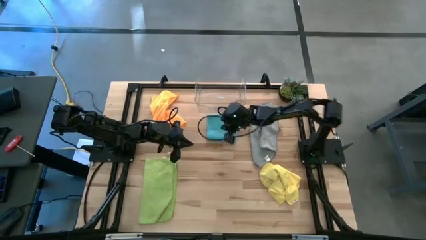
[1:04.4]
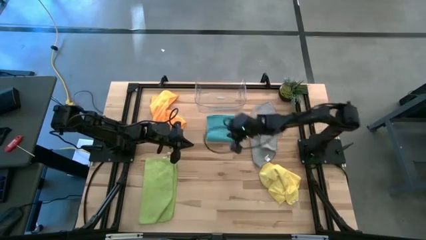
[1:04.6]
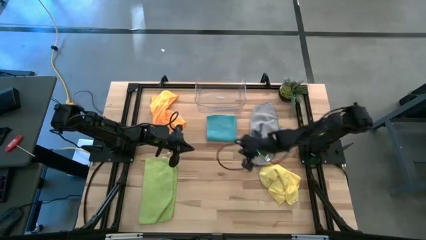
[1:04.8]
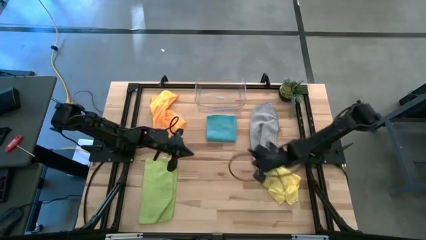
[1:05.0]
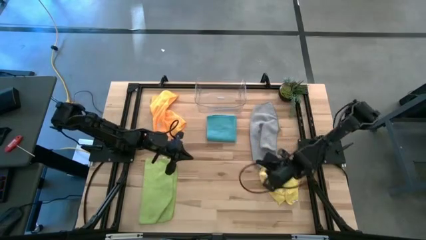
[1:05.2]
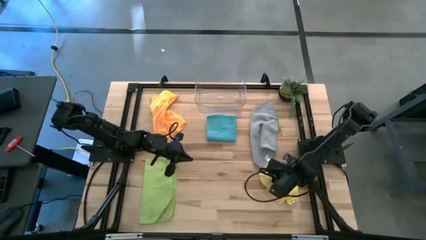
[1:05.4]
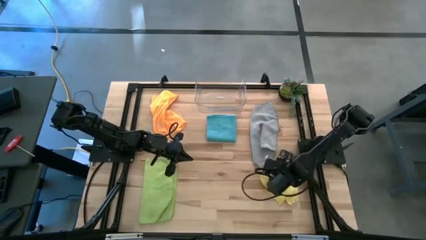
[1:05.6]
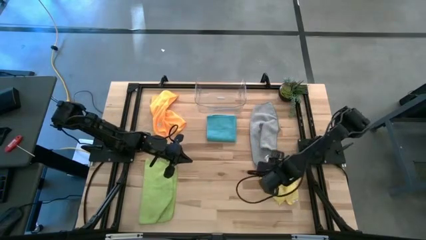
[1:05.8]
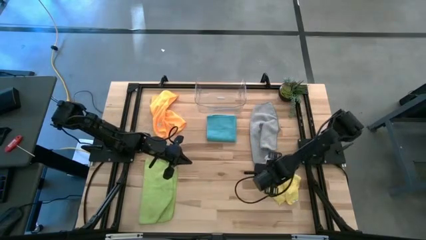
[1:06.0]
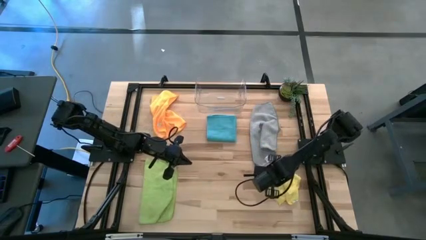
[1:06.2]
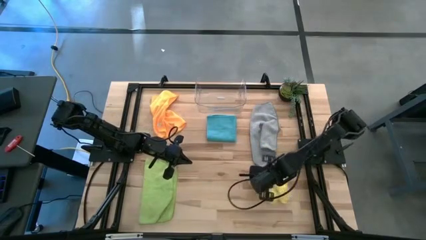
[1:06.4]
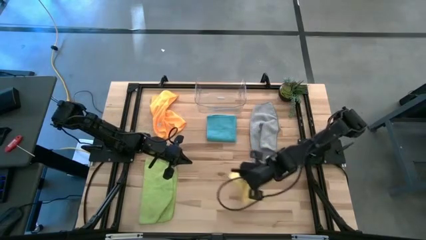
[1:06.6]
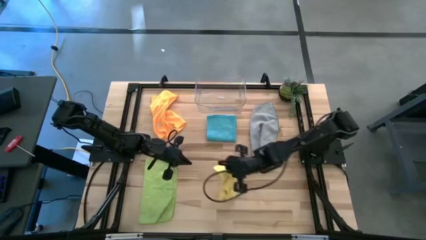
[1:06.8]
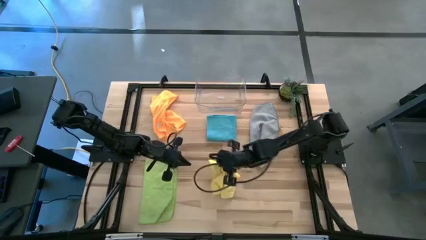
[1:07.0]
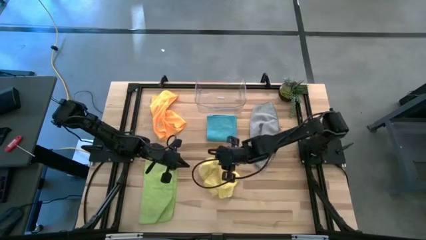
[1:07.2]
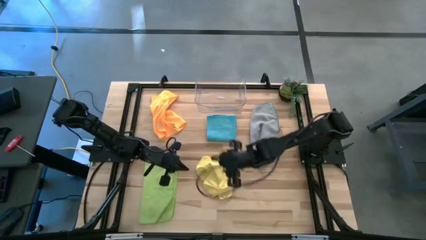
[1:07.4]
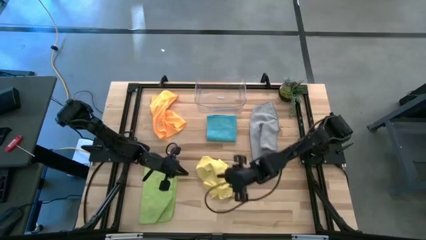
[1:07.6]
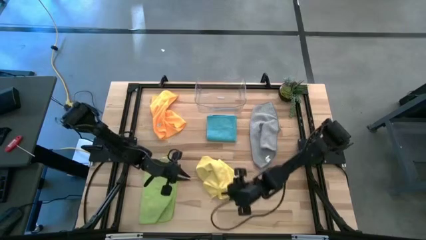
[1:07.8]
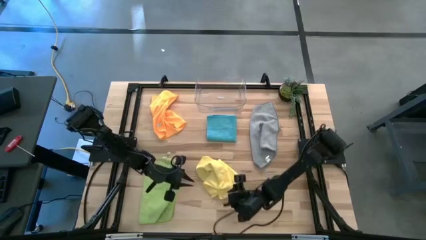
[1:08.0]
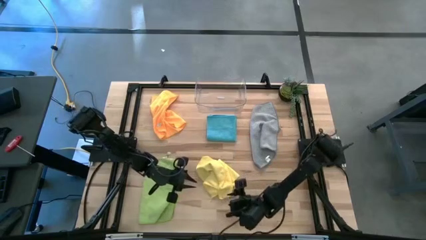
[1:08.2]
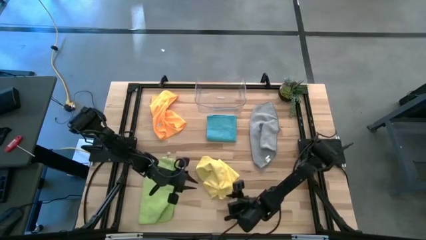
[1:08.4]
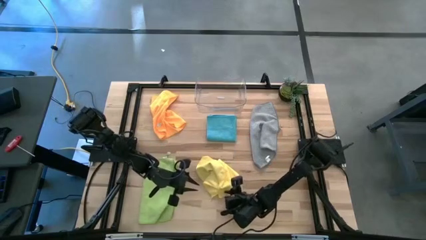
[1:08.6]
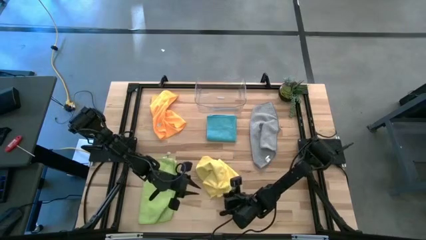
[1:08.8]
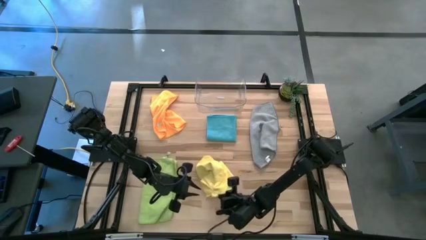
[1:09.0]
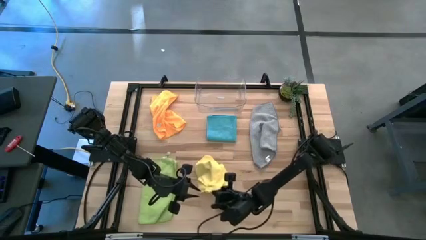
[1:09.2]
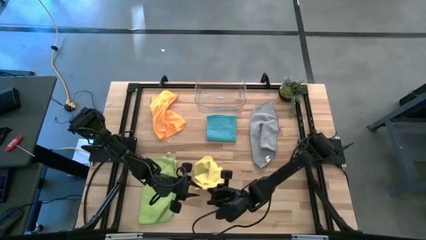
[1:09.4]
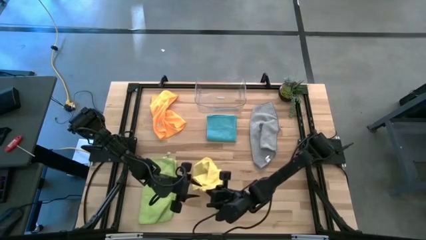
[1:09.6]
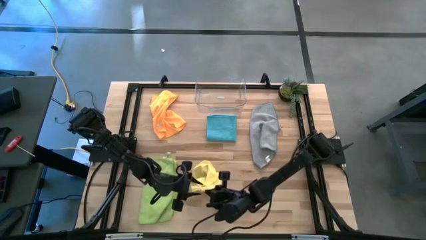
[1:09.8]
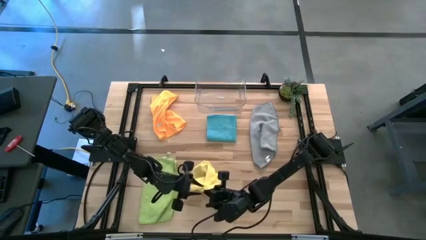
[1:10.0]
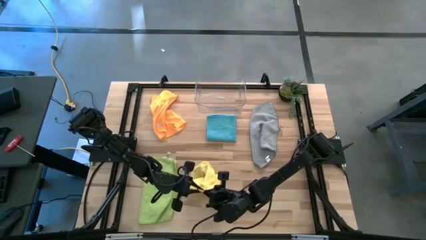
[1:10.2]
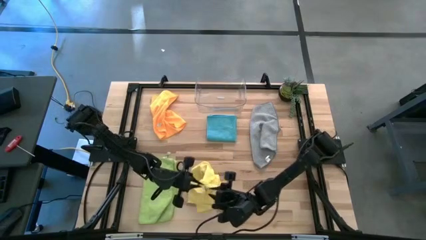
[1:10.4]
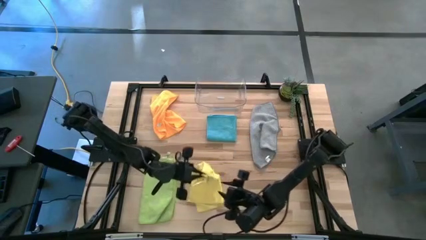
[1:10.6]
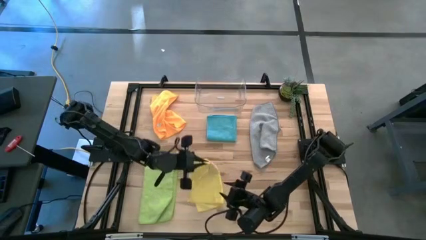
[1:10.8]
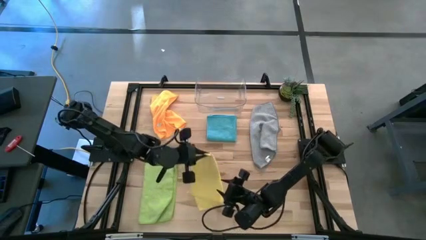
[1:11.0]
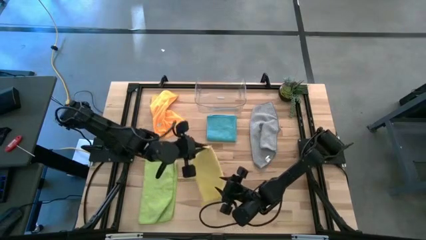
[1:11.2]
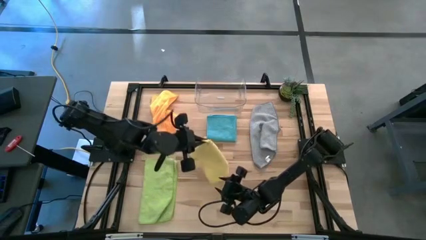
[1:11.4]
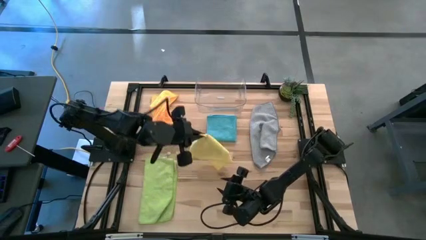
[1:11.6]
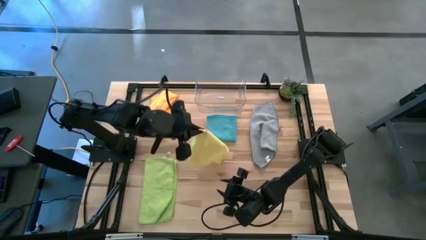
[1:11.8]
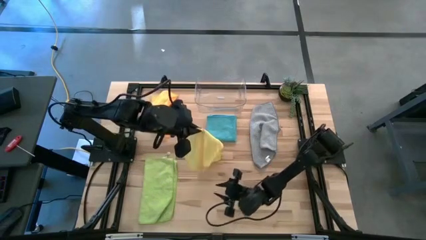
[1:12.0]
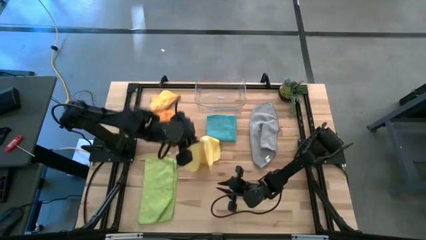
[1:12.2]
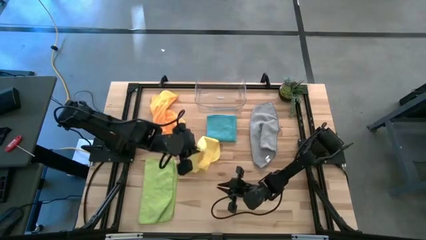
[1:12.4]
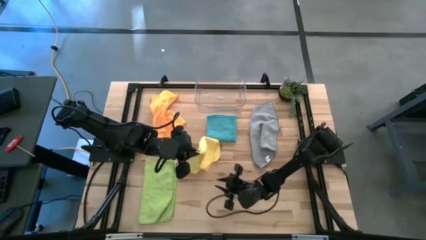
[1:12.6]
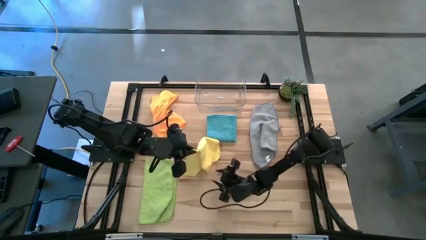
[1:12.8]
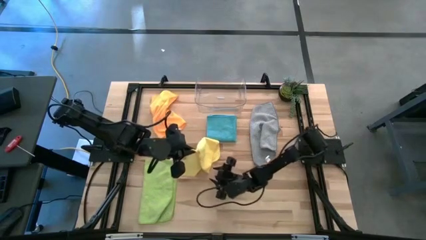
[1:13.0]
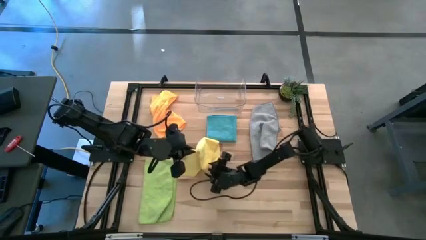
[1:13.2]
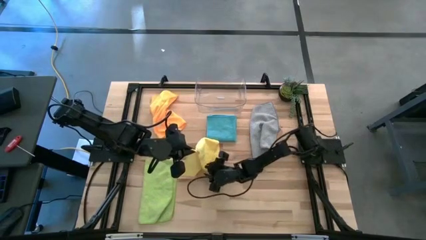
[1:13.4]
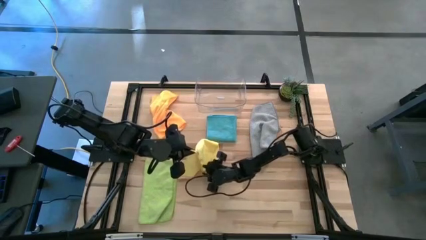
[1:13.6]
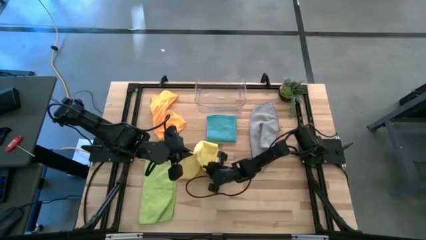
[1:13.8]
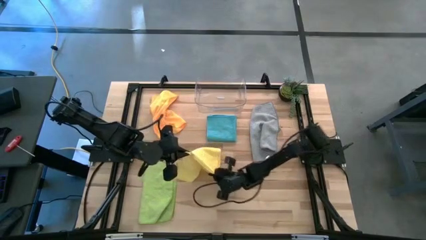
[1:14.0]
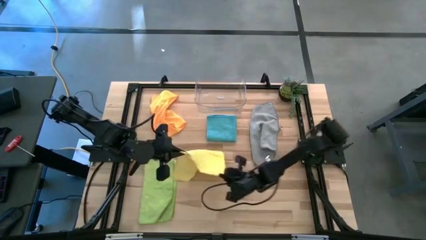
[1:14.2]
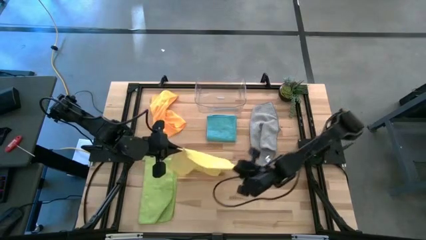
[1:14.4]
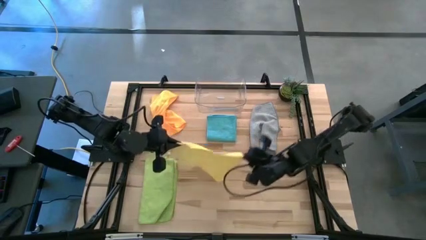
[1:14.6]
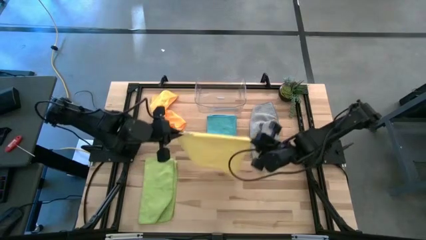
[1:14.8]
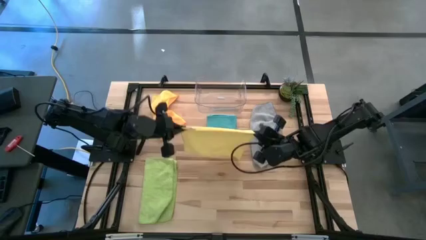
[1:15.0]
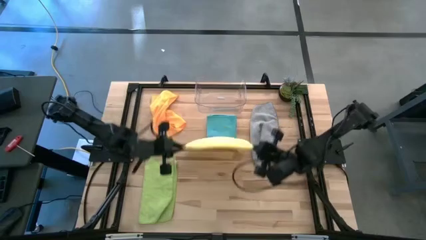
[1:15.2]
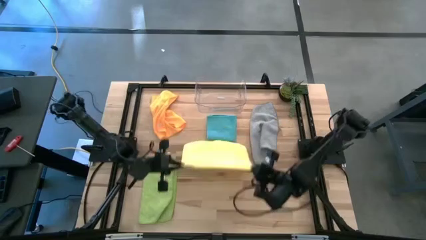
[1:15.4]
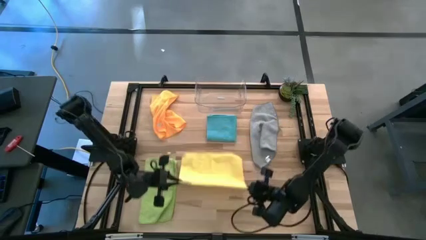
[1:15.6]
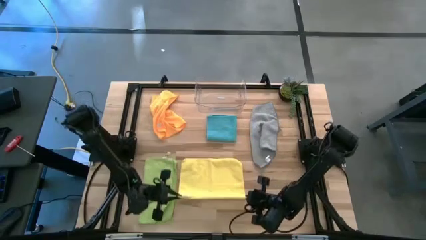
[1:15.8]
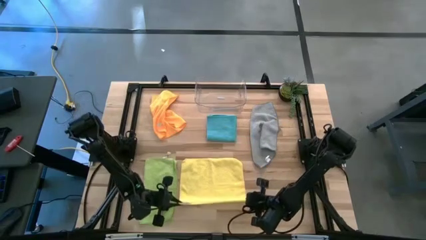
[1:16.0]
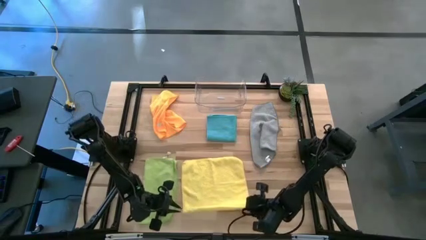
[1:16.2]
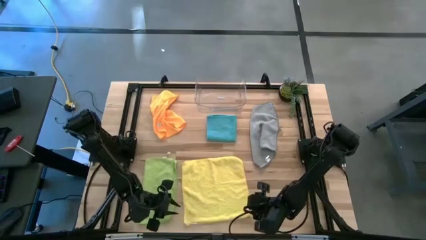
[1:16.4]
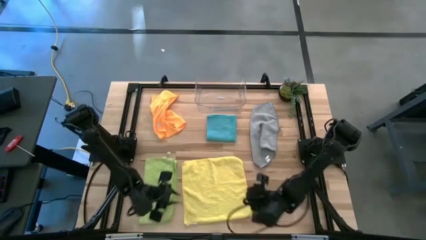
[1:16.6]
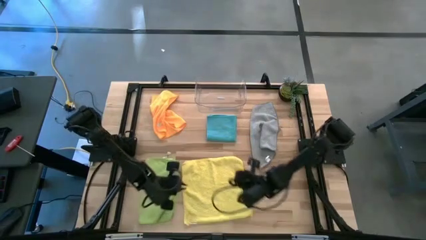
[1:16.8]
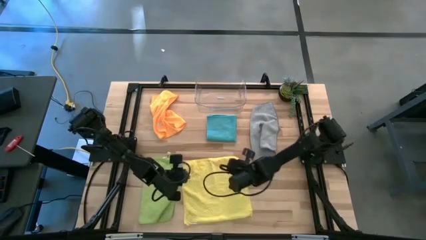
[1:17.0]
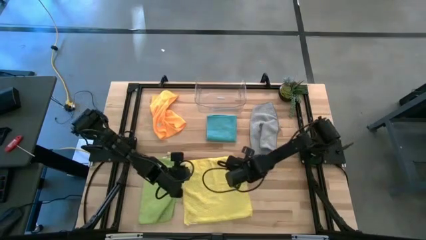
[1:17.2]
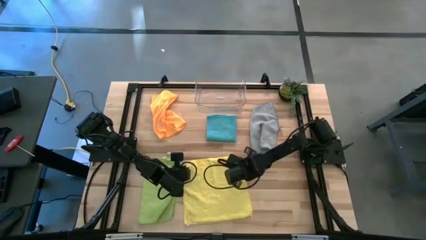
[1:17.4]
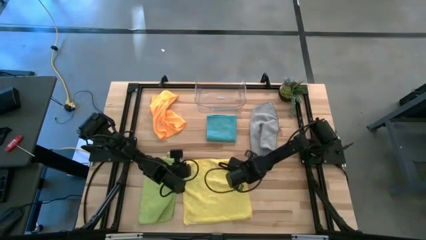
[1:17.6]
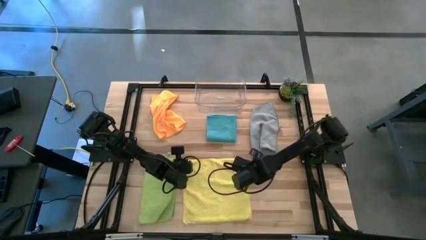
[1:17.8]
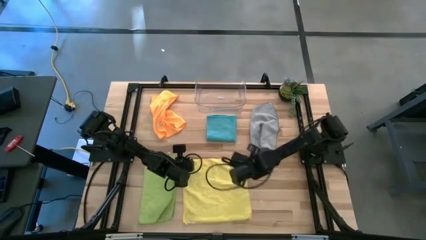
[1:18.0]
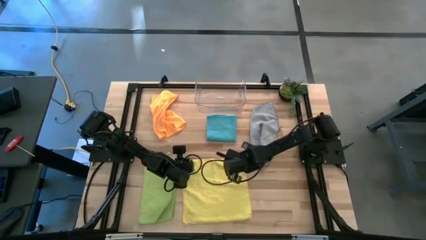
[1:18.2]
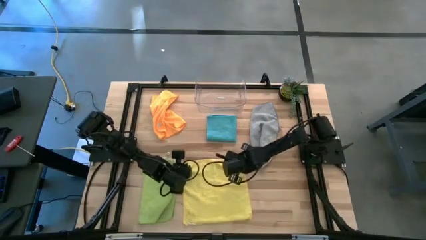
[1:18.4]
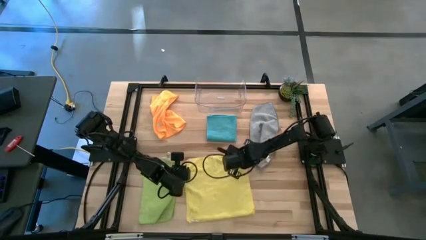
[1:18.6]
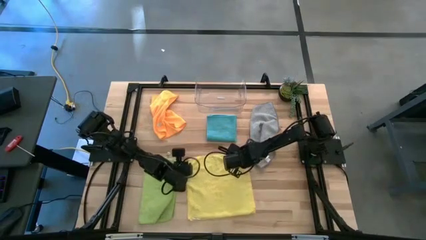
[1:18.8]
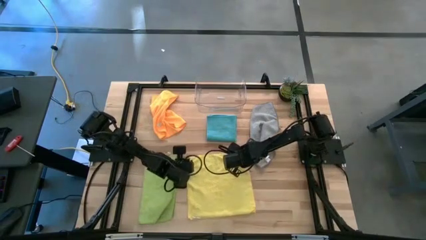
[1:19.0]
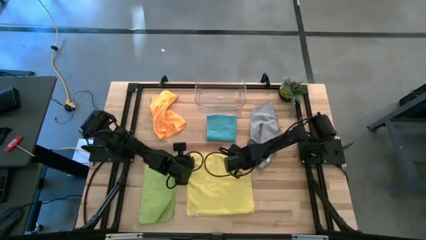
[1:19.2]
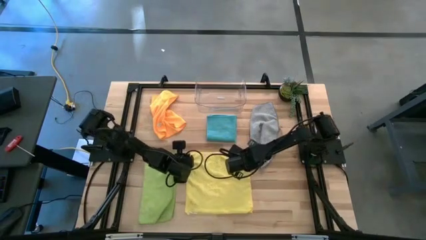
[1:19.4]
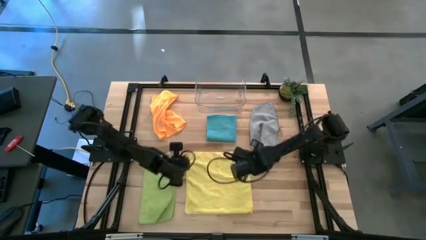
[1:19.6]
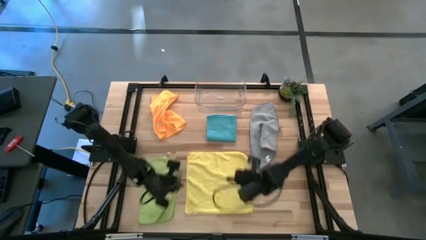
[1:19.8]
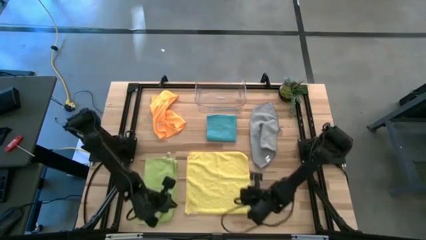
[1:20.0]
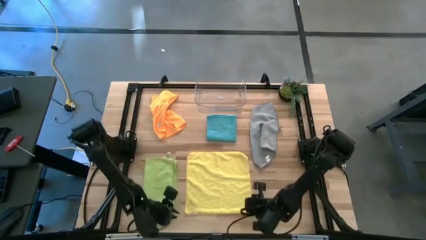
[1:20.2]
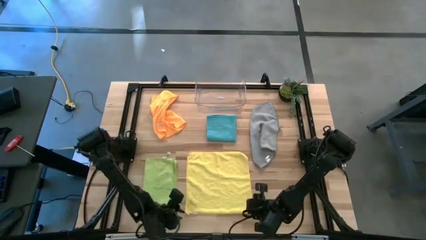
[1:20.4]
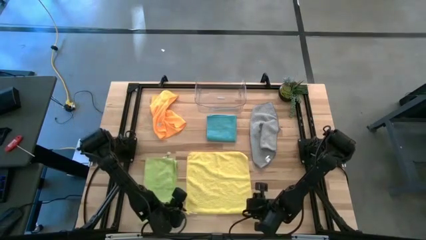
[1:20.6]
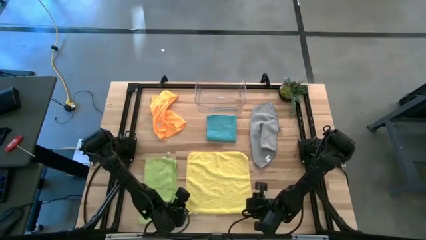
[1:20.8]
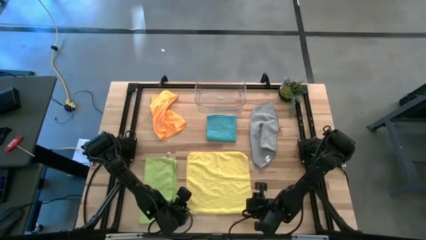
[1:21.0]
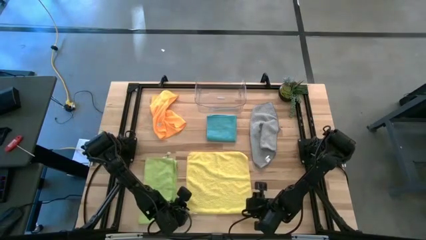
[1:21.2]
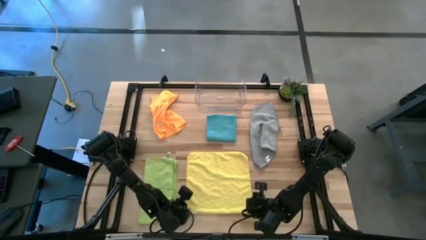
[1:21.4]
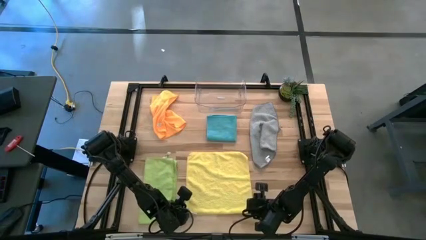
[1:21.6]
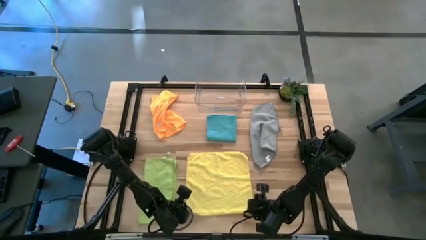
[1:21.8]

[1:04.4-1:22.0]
Task: Fold microfiber towels
Fold the yellow microfiber towel on the table
